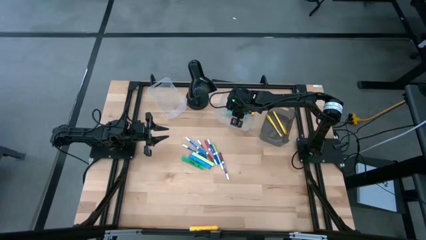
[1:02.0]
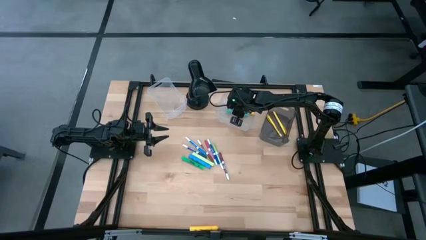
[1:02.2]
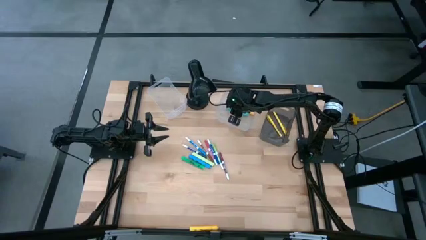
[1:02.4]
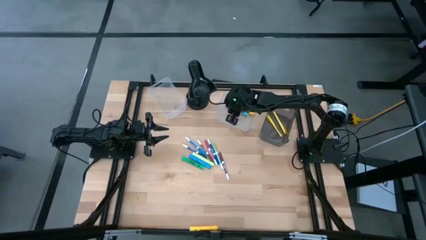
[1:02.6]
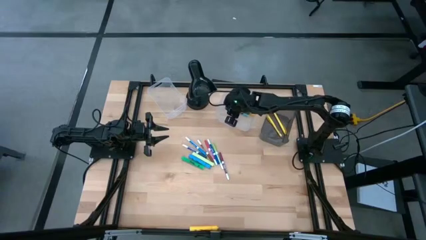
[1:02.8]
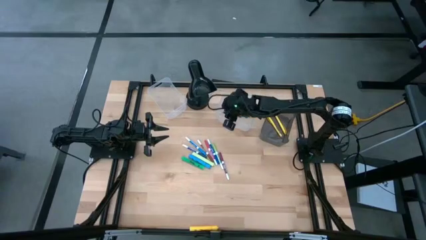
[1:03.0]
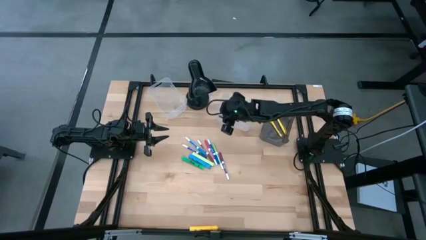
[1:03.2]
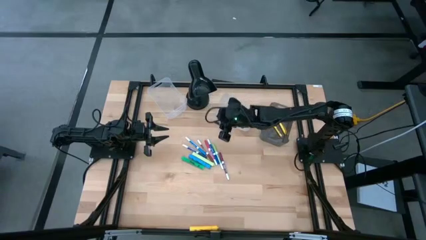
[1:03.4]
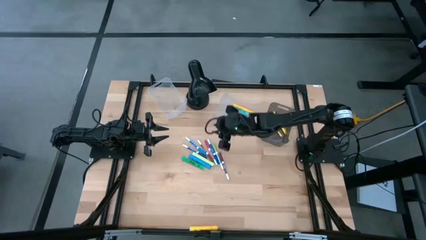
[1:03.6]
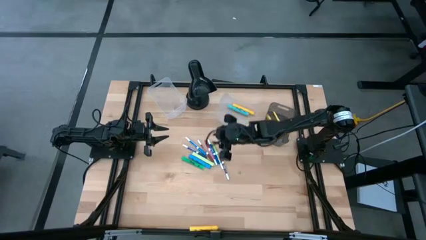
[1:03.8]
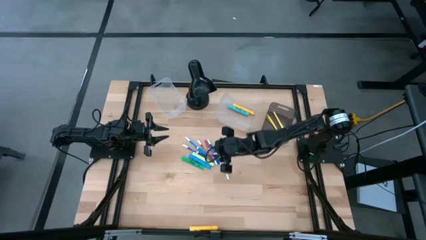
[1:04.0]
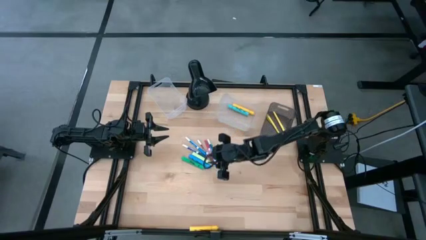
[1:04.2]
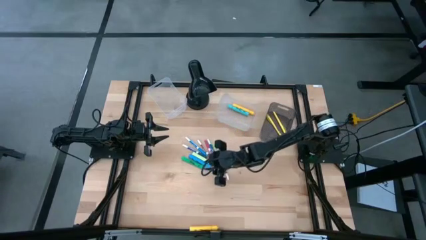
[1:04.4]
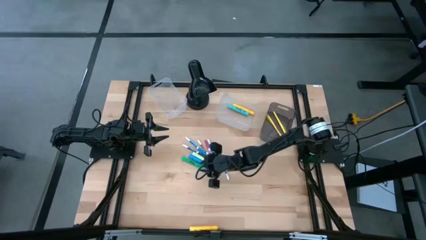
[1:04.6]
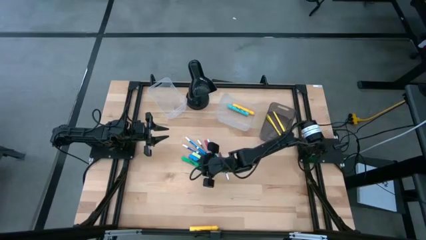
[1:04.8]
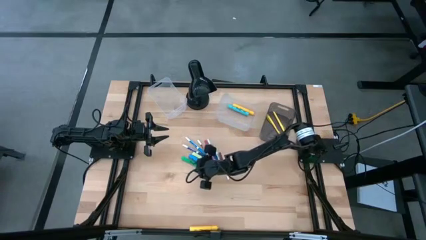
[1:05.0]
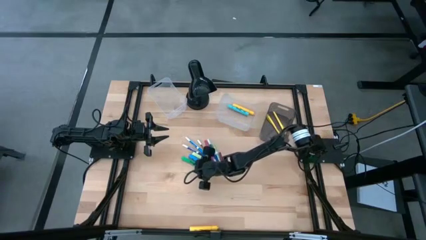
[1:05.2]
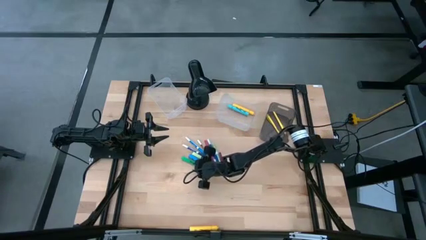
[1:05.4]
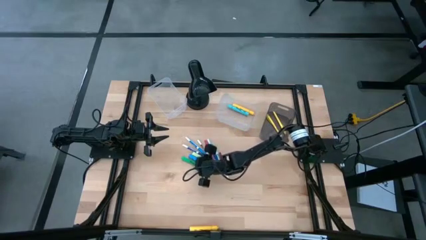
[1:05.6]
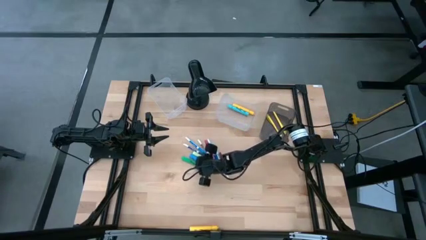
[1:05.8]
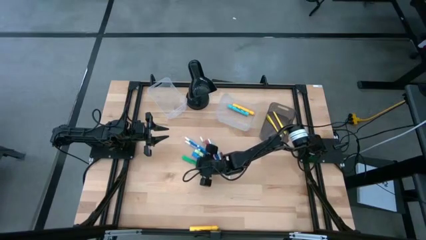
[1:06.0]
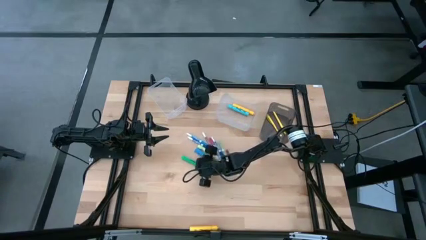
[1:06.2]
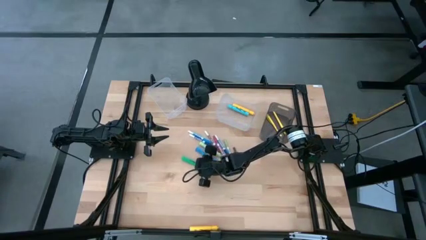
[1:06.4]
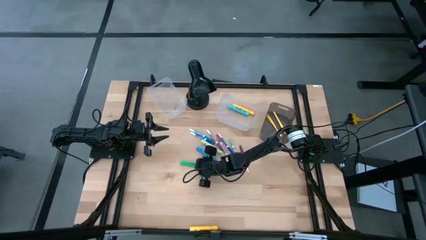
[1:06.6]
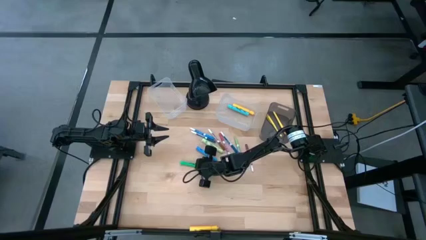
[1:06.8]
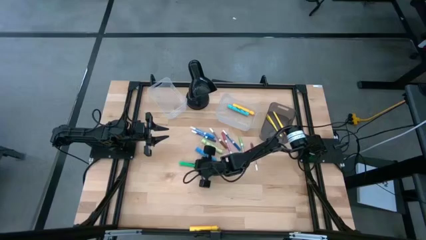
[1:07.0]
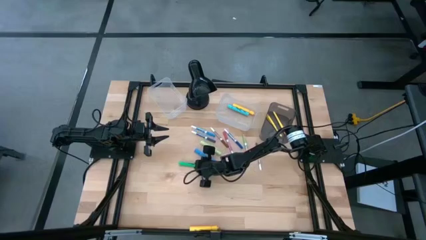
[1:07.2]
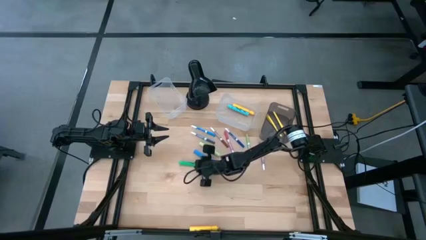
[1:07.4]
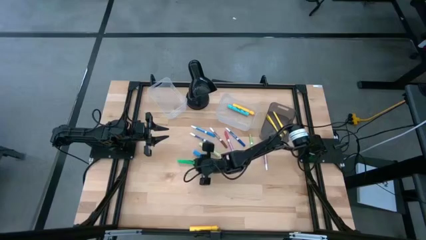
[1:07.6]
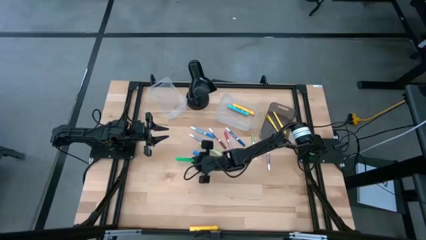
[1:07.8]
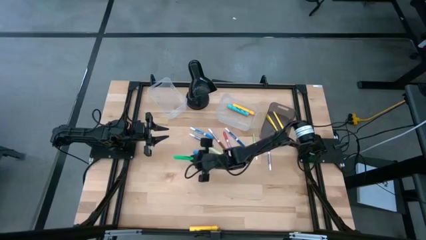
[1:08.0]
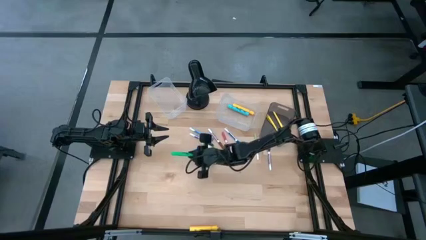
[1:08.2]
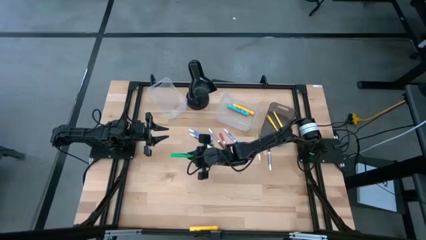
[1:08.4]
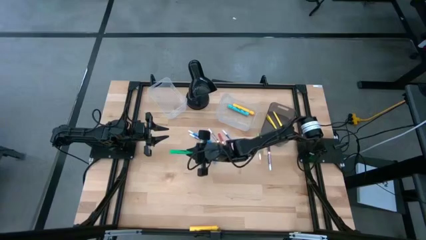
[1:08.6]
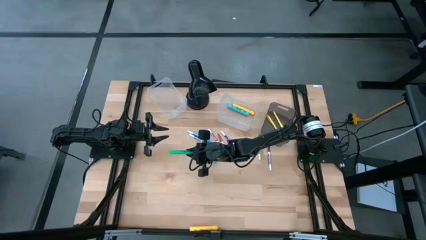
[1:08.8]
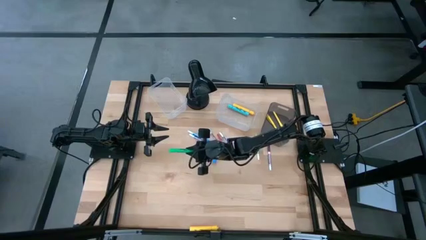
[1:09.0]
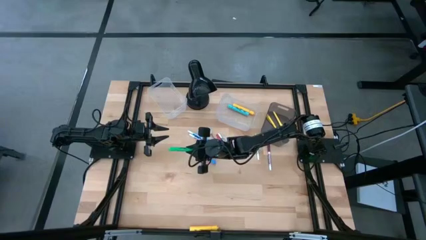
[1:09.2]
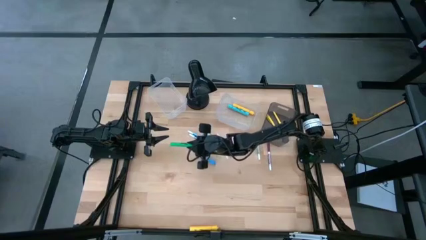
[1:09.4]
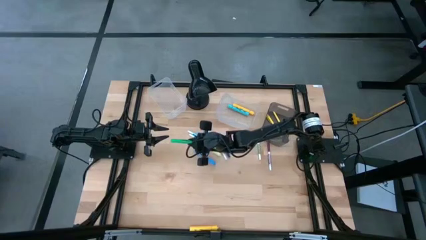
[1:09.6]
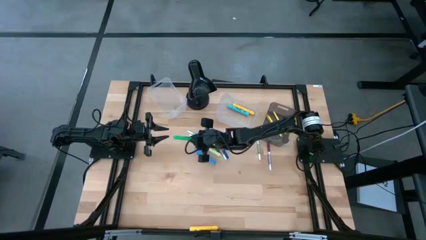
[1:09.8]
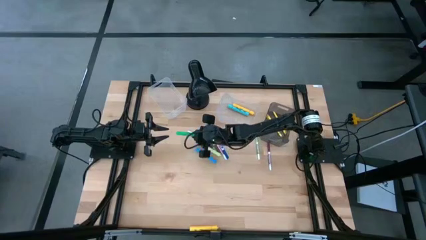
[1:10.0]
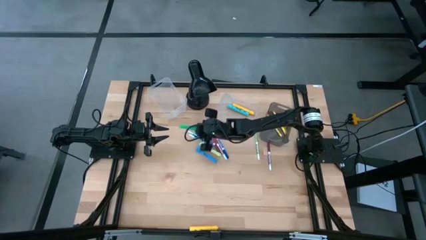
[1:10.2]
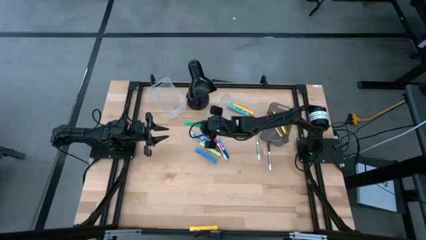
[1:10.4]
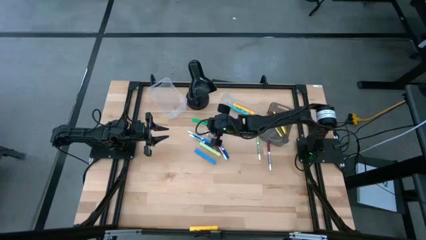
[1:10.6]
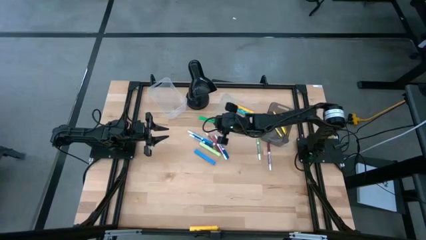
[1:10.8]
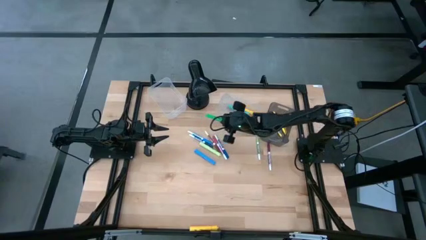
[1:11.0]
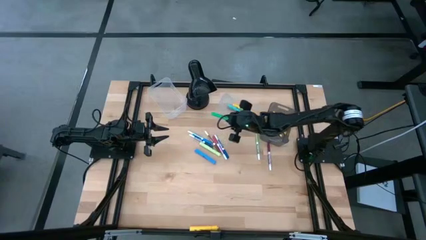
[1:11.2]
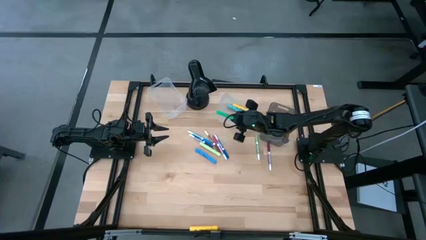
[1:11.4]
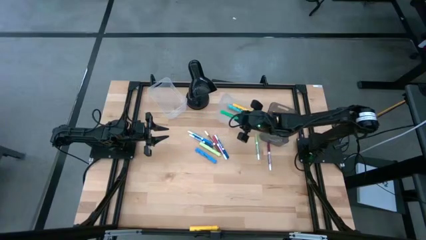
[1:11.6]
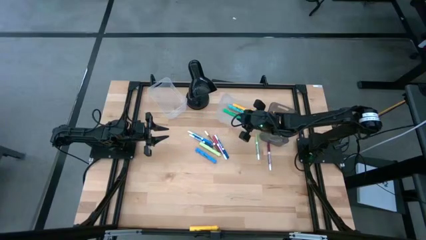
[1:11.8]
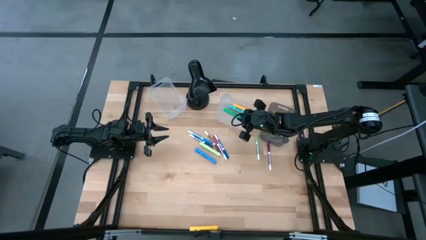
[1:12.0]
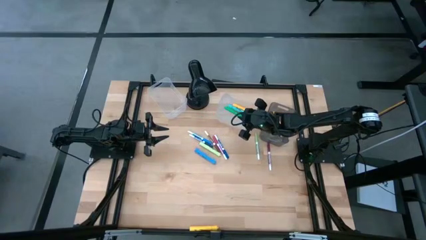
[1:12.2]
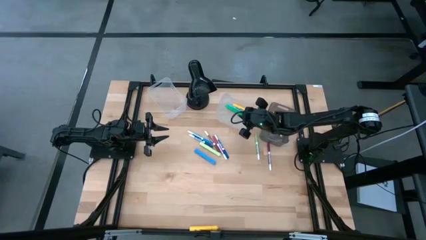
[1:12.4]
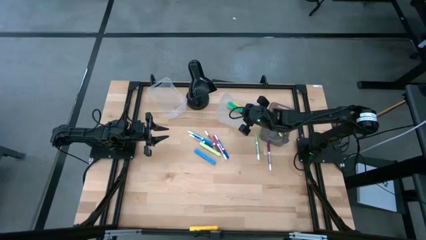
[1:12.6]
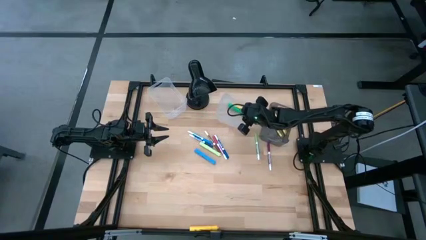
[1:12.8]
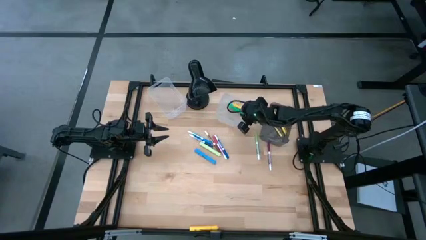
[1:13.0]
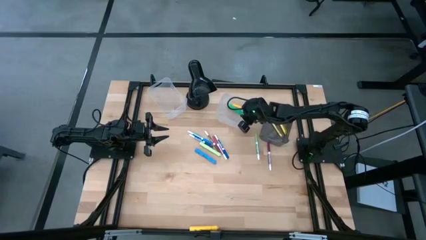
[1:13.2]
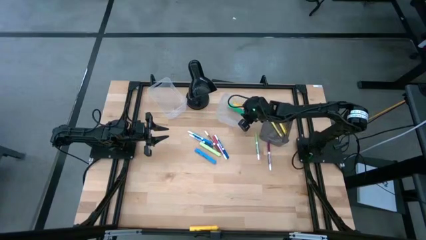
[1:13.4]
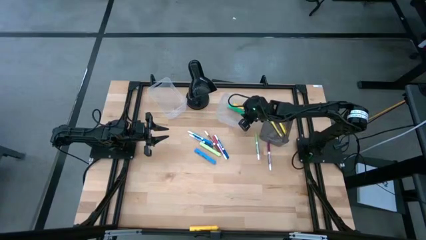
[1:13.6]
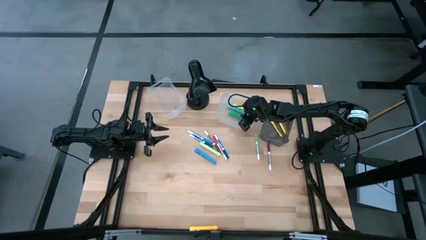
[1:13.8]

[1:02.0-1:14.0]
Task: Pick & Place Markers
Put the green highlighter in the right transparent bin
